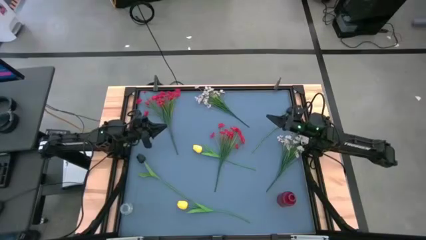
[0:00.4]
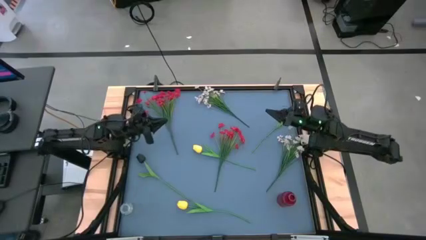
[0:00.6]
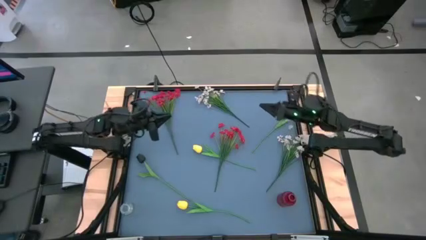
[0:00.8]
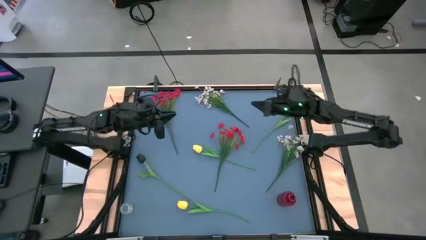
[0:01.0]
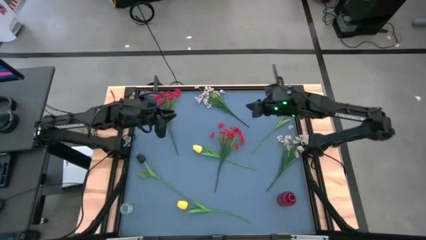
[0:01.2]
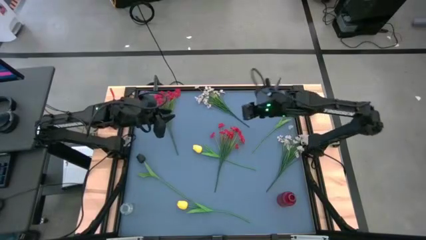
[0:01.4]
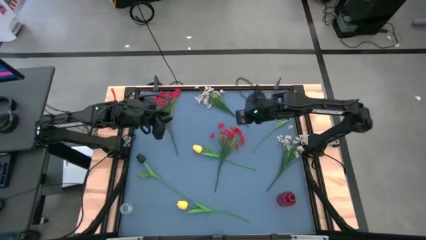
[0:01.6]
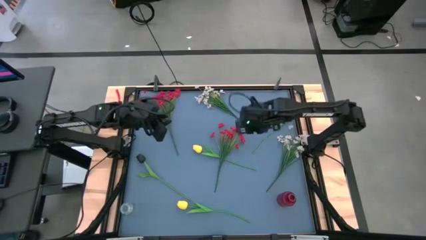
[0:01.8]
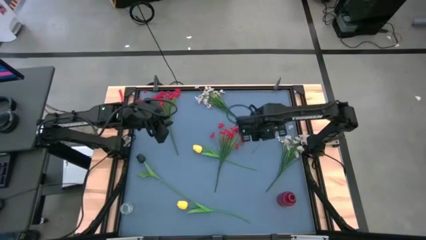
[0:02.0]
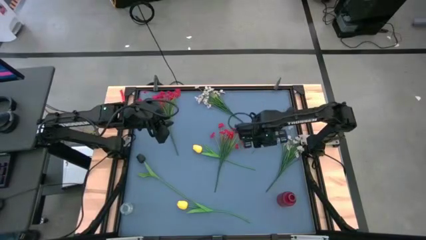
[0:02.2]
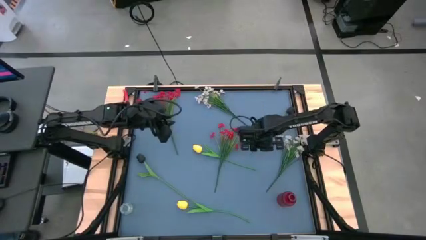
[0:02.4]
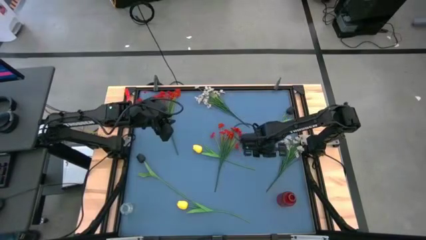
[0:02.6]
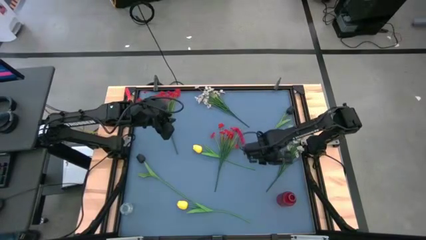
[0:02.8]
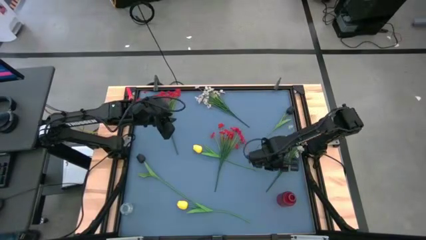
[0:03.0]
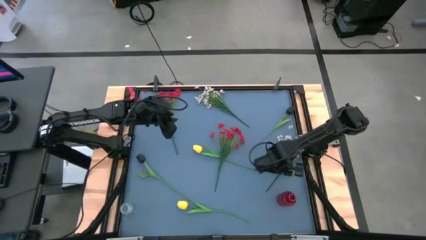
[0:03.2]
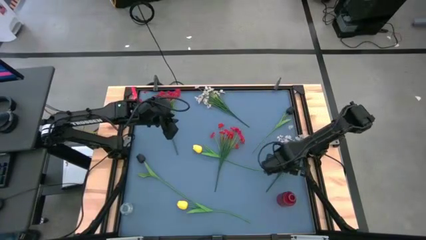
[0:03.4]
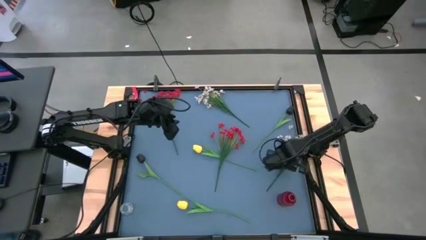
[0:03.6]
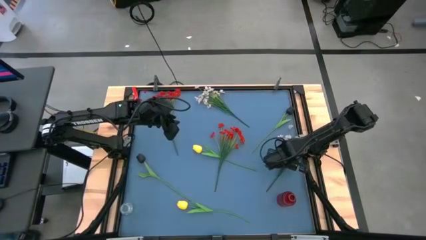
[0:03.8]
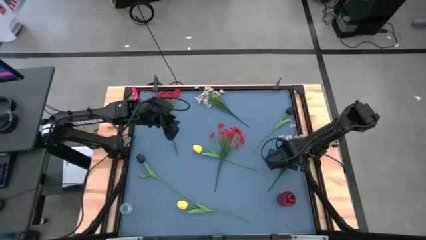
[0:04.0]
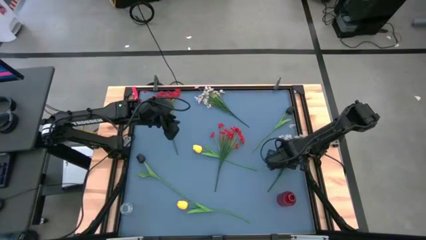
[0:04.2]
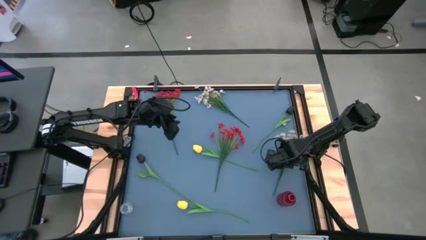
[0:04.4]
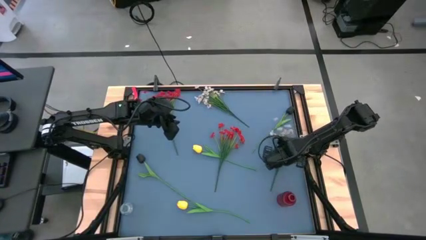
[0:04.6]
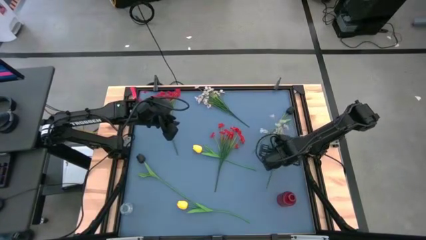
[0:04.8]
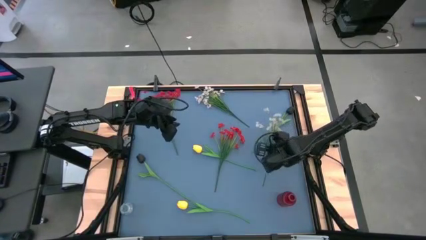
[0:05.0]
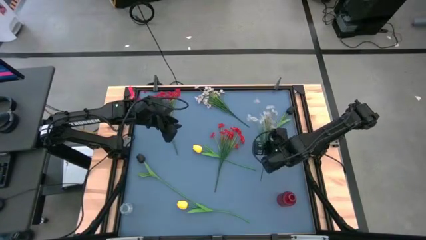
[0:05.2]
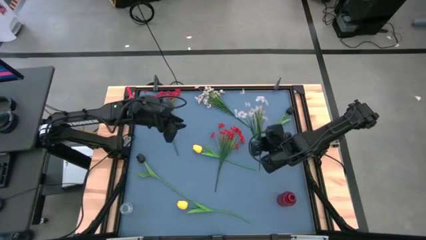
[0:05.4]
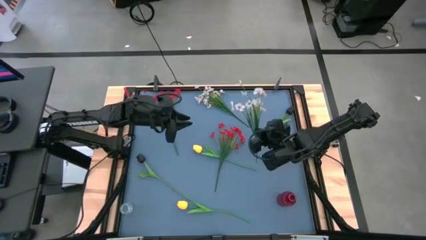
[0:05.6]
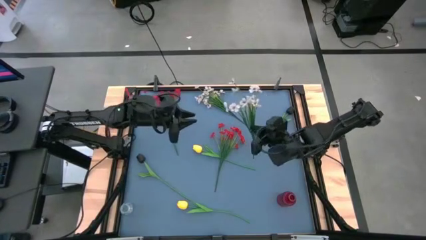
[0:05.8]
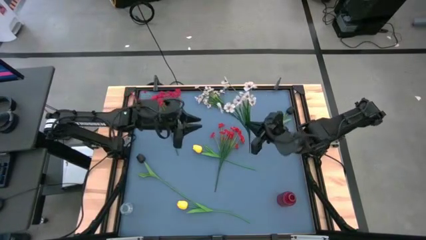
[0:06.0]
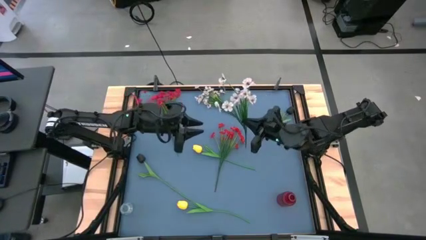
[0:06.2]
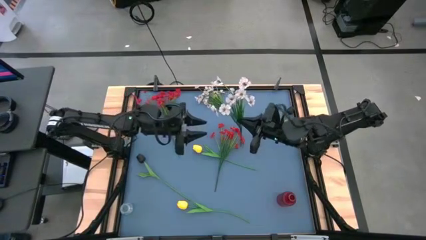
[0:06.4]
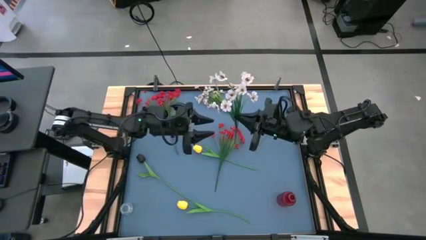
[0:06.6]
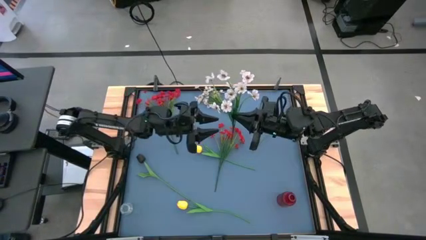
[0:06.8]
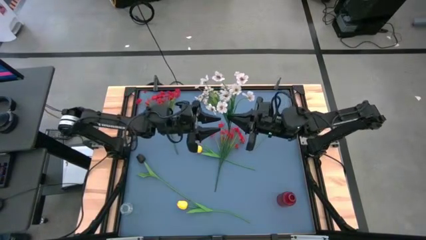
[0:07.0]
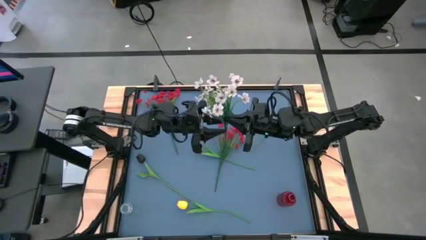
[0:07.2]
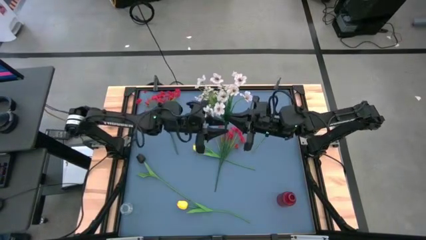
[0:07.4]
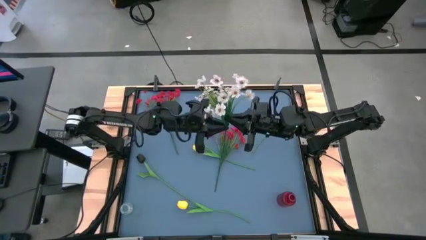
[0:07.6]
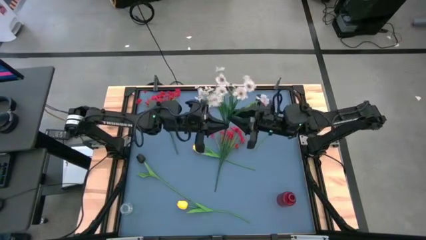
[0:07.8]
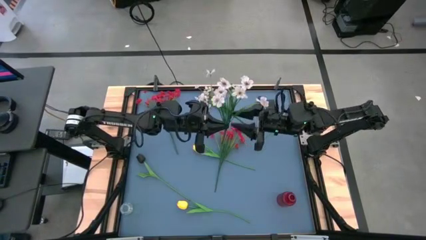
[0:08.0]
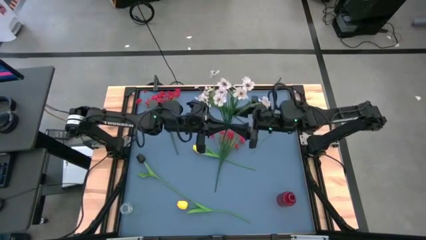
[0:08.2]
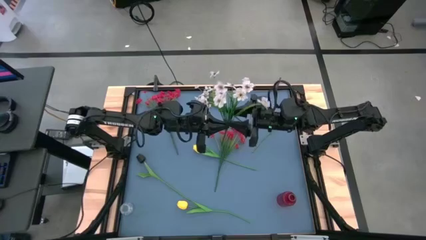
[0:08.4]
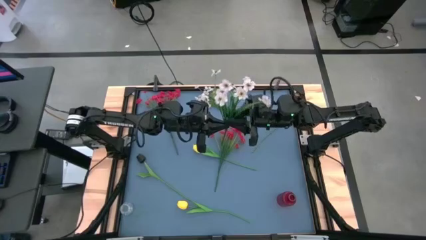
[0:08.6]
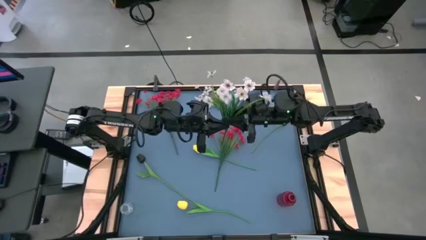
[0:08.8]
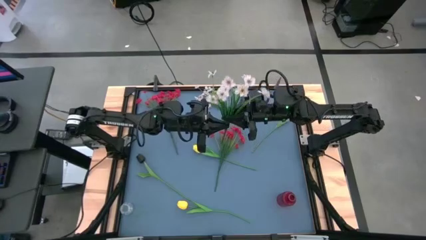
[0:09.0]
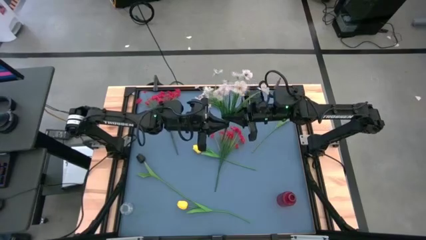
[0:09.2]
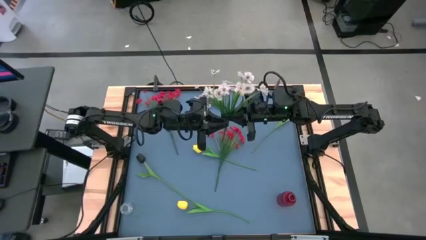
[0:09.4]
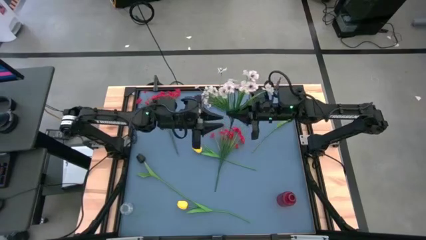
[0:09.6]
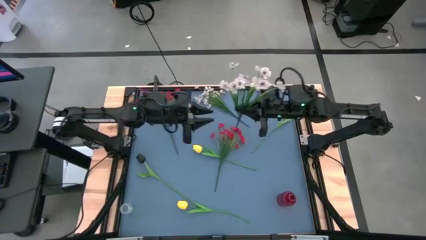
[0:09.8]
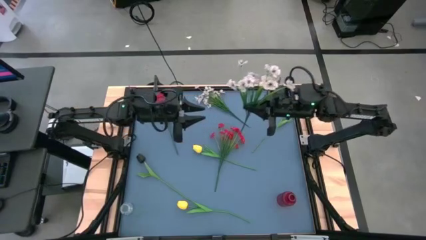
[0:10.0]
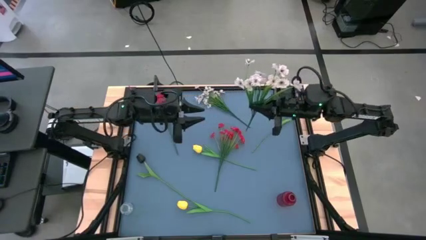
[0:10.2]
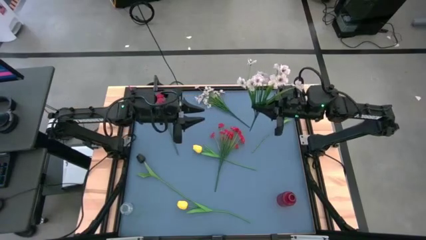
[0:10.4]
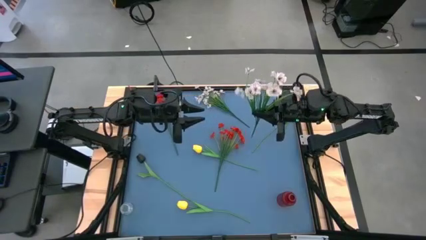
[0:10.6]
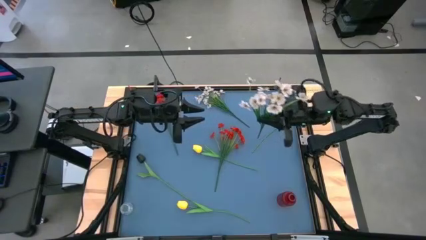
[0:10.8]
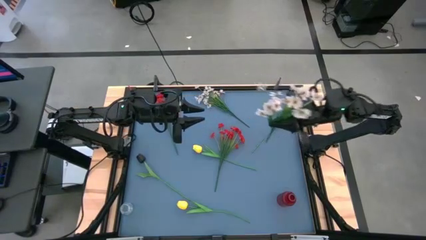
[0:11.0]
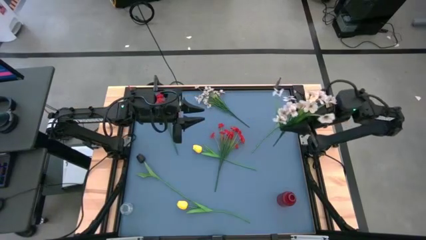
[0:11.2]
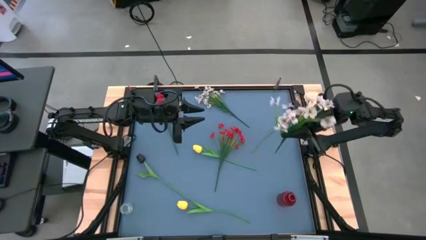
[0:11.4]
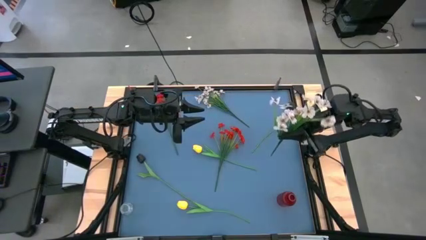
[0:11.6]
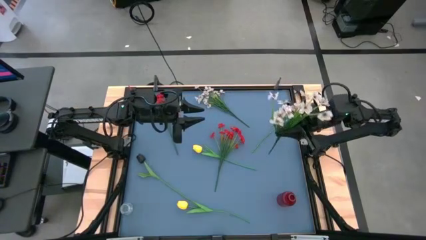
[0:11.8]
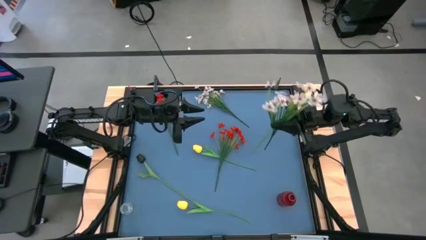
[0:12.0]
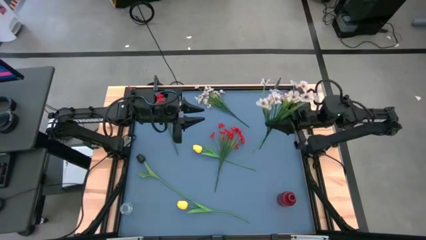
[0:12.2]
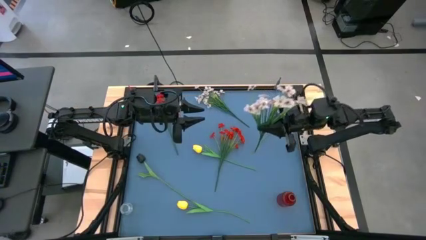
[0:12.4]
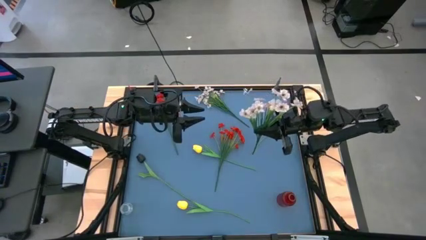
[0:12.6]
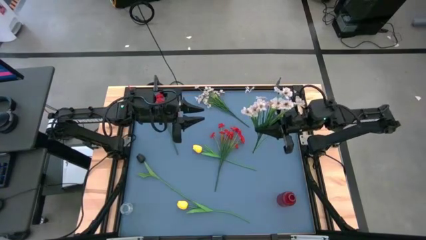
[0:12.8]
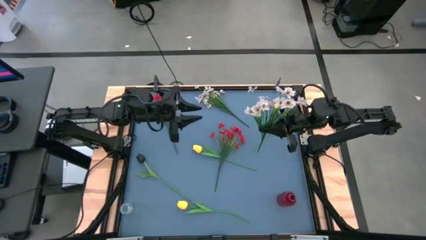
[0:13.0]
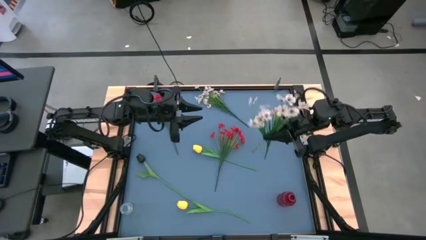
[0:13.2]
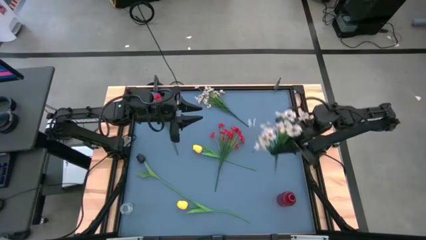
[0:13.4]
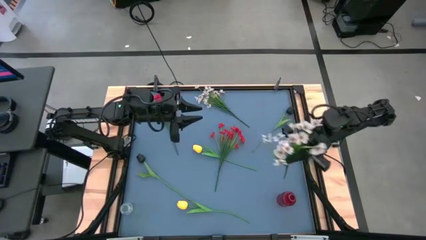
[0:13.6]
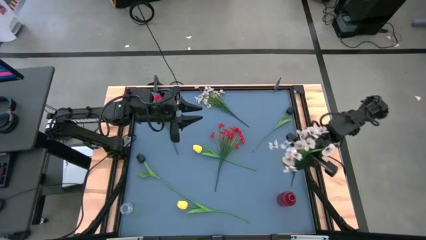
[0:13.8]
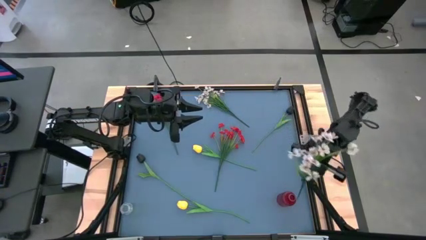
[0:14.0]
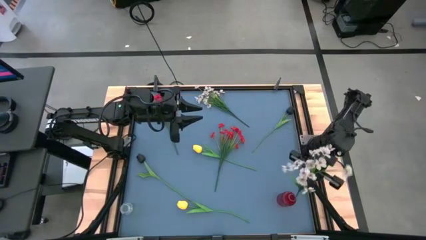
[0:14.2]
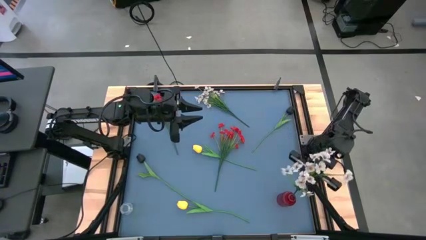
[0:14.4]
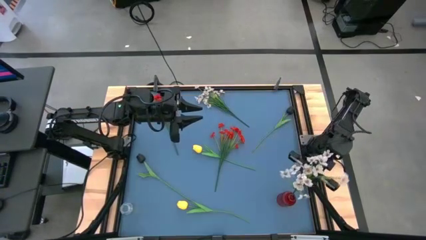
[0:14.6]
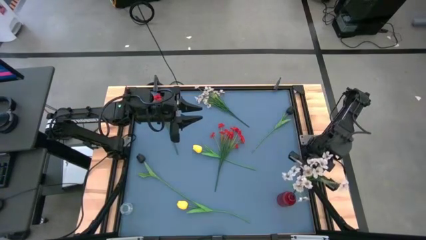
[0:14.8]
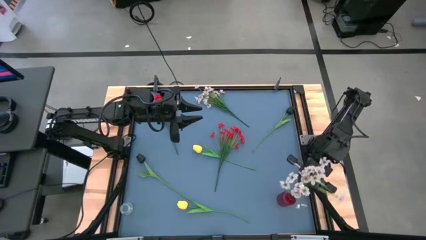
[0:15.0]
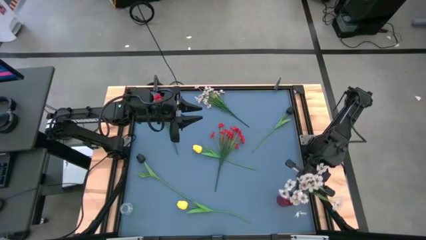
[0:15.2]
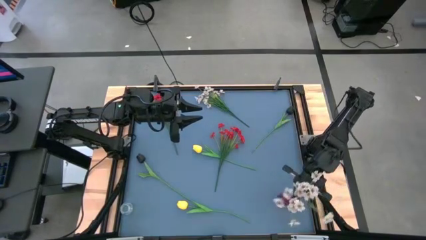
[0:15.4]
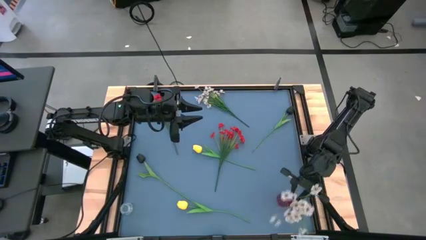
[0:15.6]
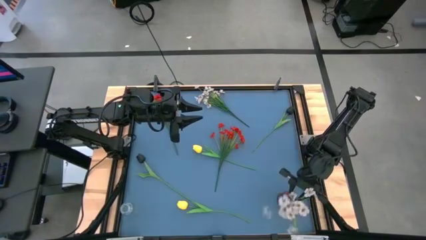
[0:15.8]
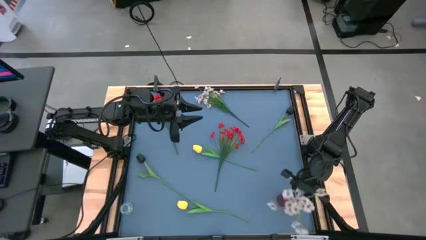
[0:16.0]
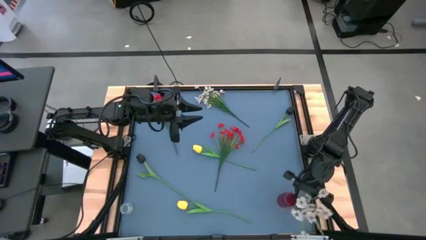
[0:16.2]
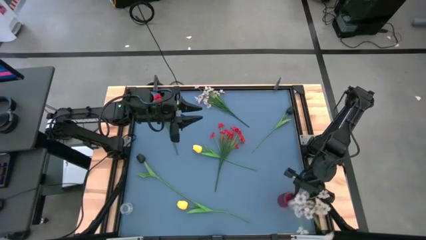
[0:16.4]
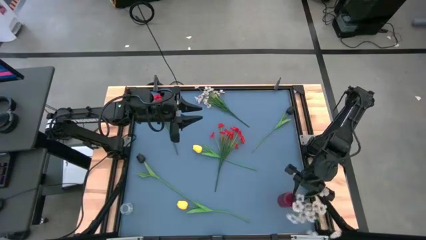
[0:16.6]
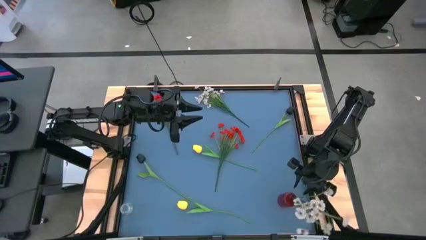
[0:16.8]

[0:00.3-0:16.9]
Task: Sort flowers into vase by color
Put the bottom white flowers into the red vase
